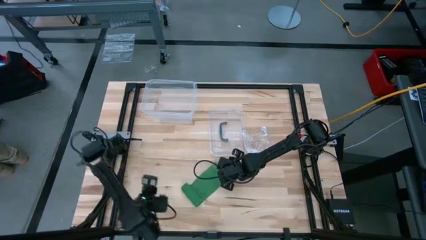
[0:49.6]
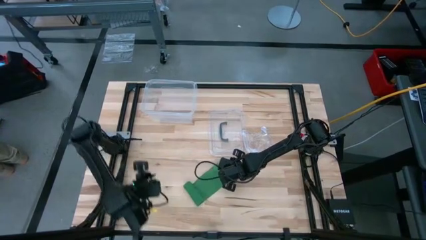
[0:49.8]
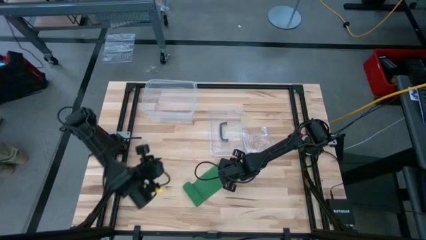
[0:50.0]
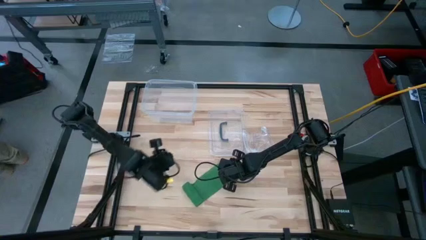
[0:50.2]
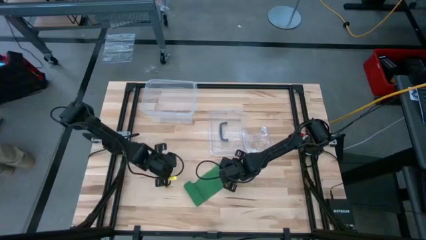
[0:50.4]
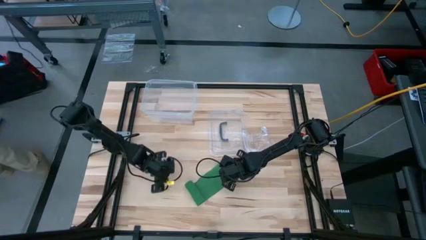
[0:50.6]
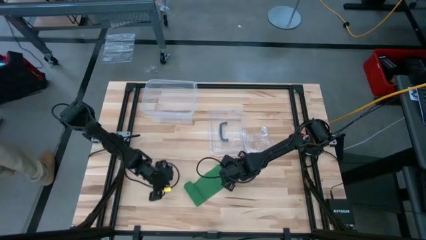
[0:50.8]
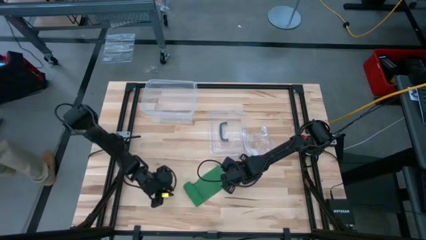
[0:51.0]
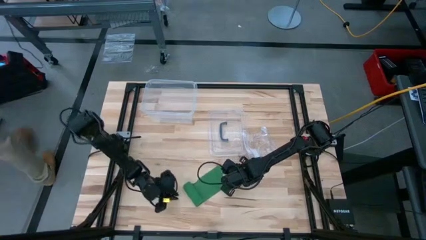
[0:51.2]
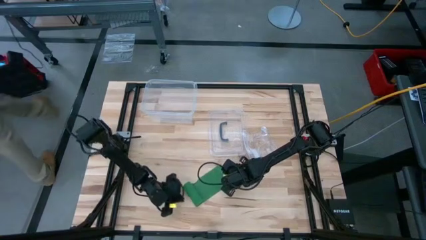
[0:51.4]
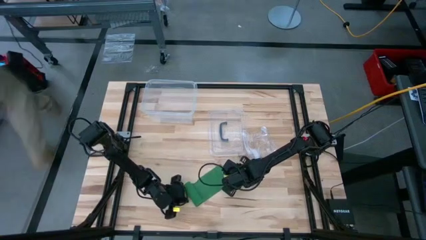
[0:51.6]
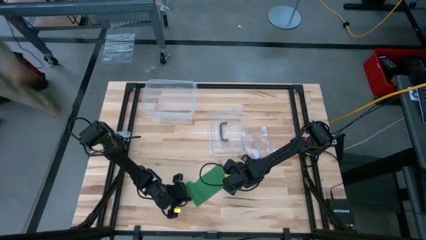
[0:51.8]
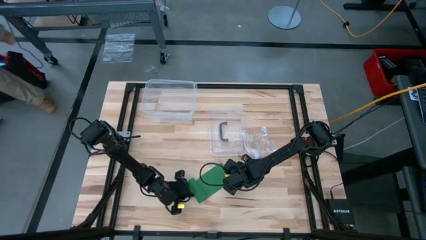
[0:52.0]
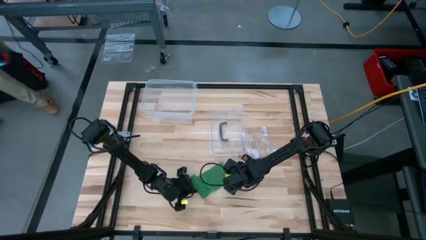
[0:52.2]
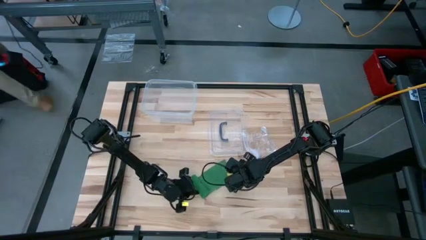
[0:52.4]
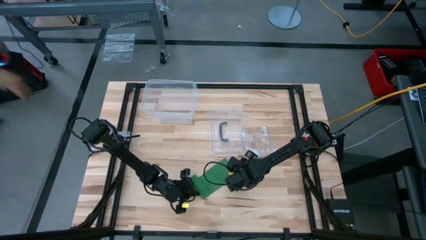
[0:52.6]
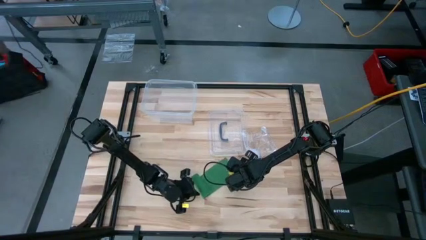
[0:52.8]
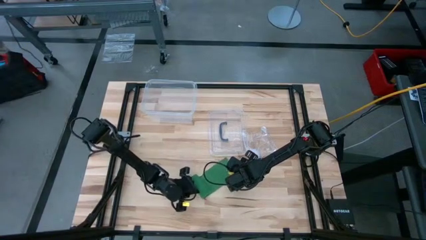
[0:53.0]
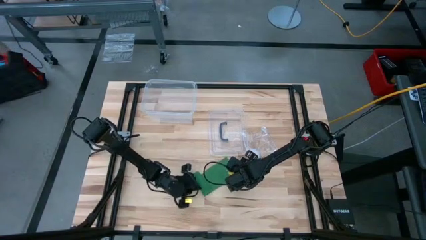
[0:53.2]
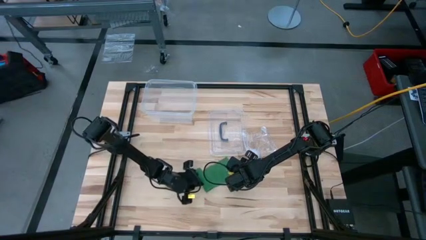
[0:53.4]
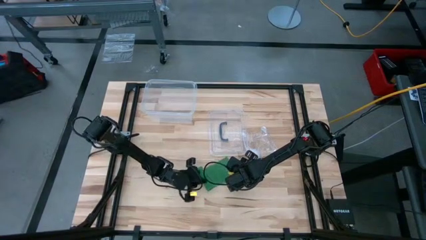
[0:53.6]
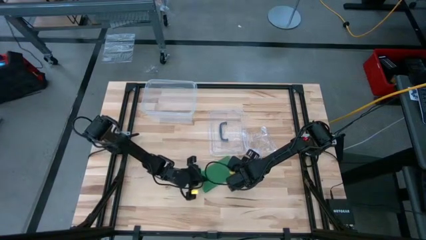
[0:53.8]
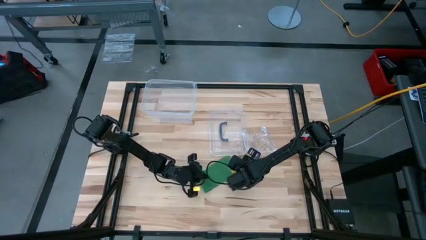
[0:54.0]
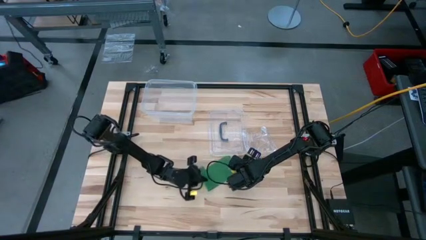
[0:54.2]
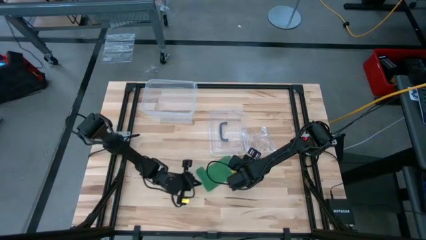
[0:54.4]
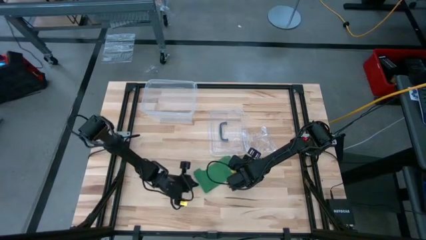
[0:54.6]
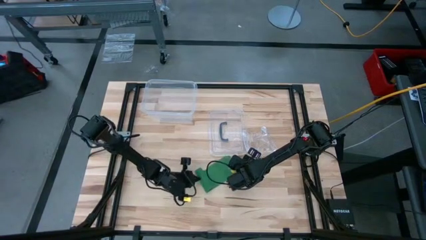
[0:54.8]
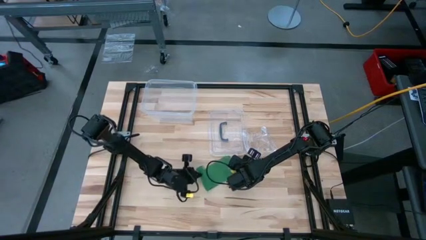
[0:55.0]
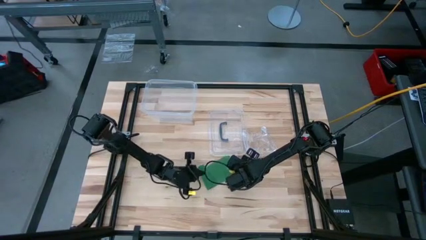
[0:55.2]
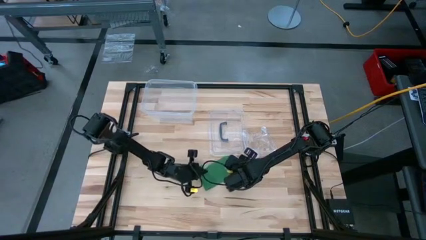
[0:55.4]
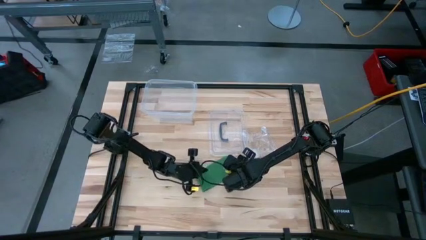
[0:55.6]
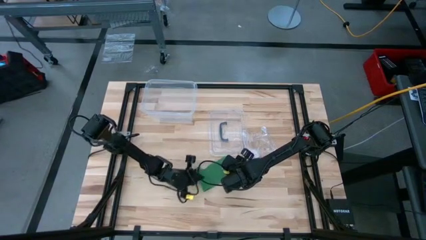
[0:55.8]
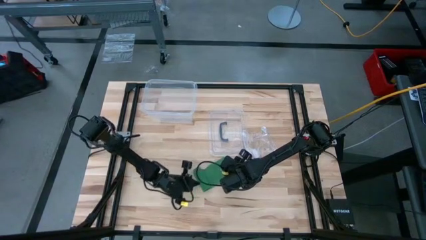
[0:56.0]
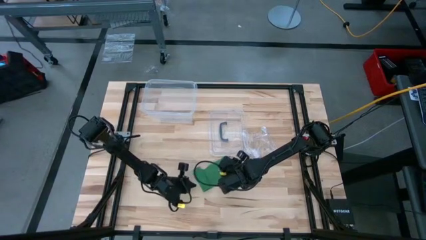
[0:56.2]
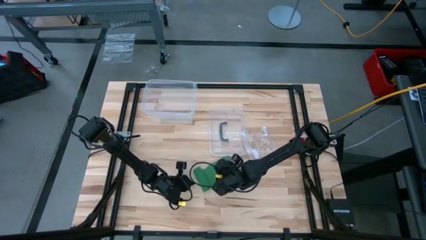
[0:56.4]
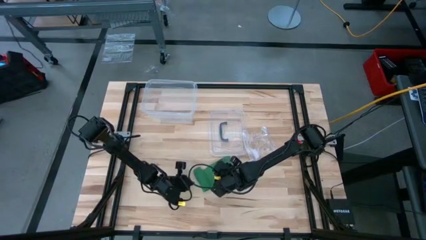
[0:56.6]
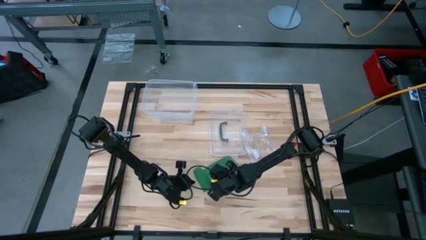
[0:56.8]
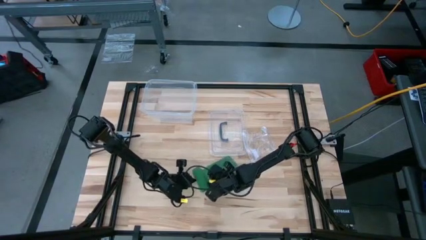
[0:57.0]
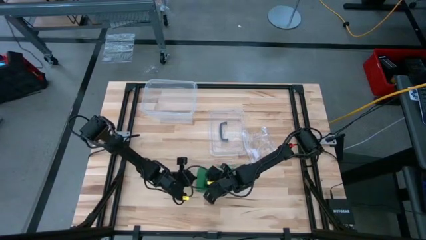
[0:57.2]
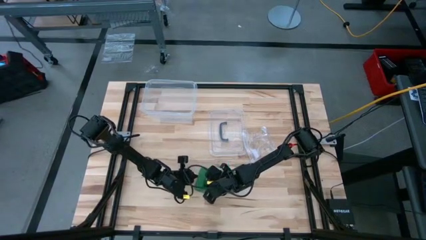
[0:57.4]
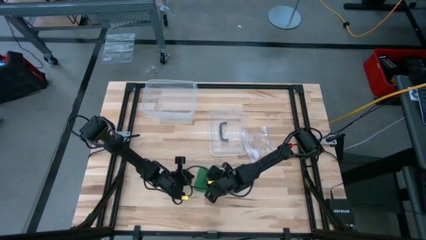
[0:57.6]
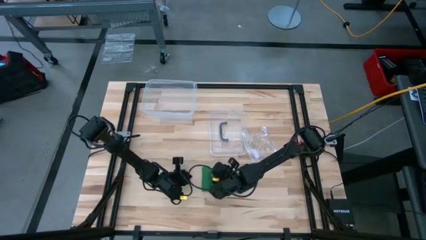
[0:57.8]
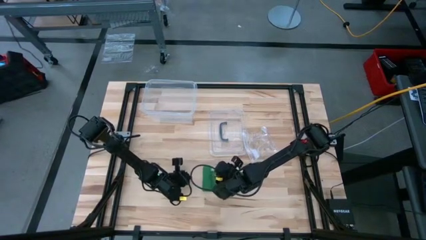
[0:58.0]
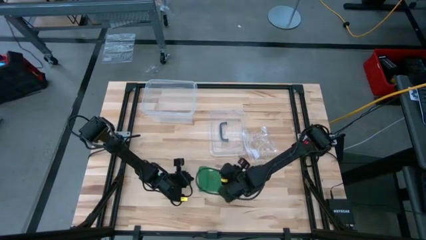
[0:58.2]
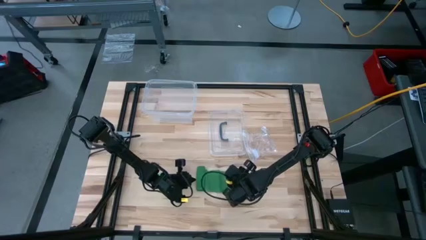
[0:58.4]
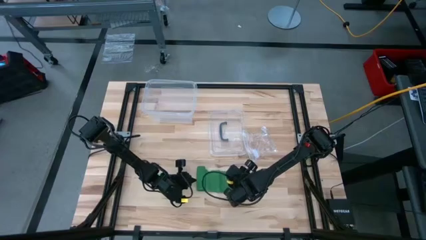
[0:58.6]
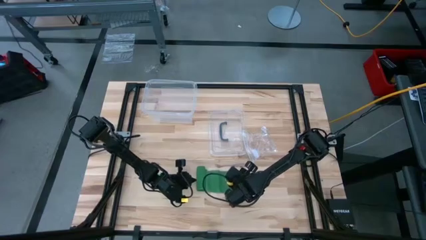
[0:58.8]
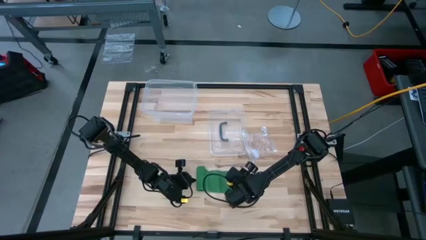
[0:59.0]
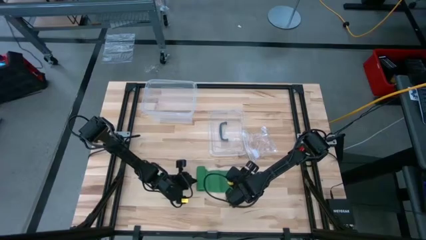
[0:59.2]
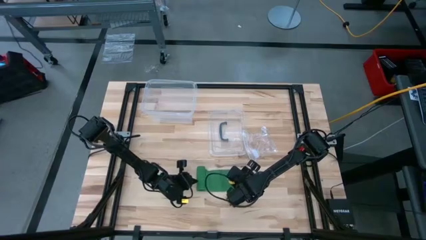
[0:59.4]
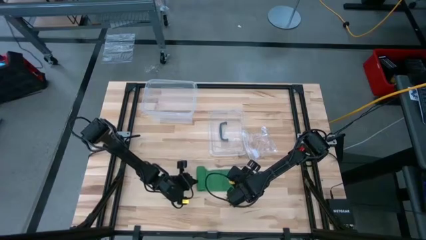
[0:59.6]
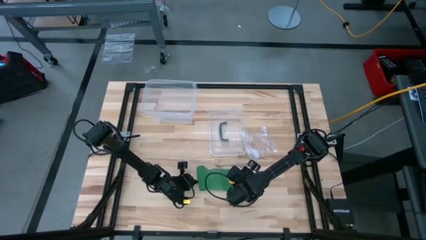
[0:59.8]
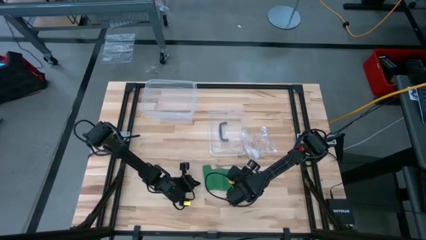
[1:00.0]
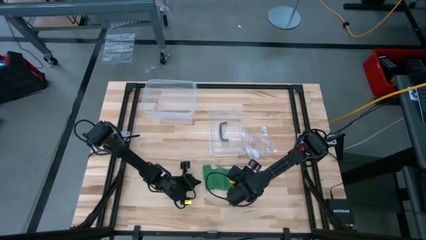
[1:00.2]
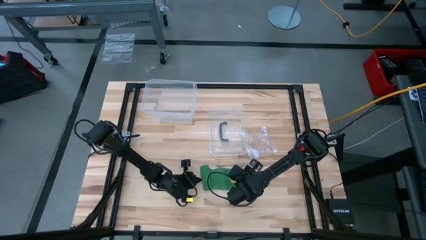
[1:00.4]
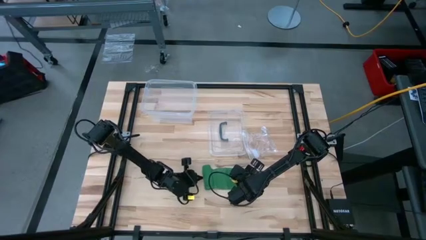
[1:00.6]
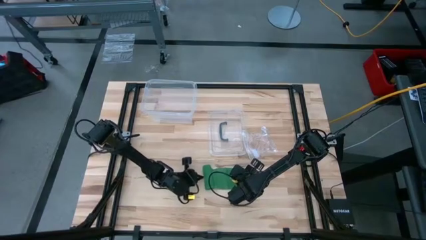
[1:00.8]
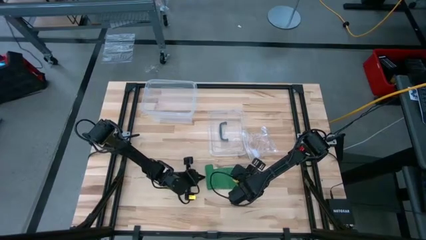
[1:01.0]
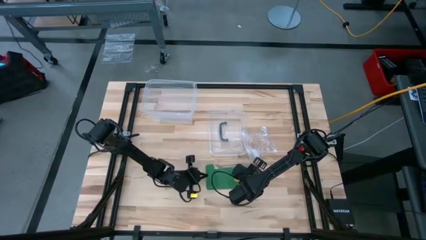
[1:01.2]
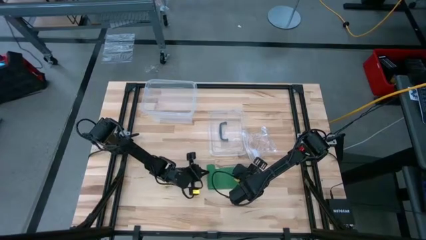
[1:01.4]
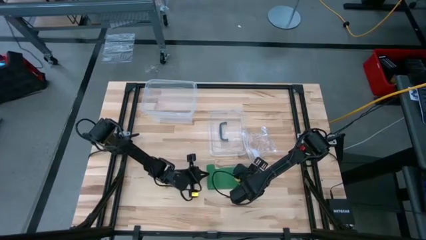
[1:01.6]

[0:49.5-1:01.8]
Task: Roll bandage
Roll the green bandage
